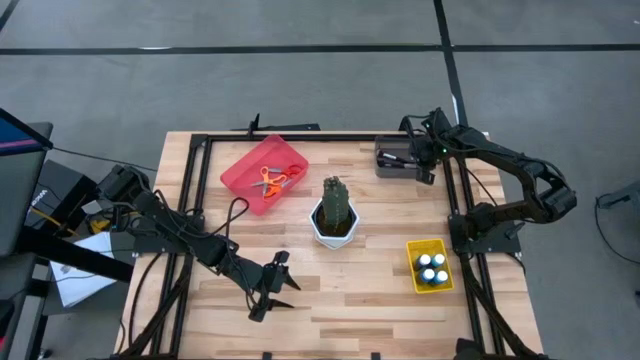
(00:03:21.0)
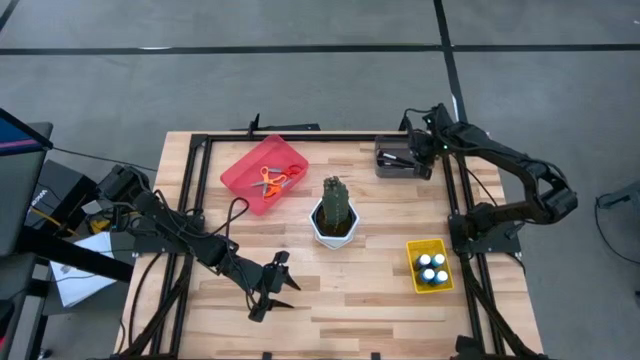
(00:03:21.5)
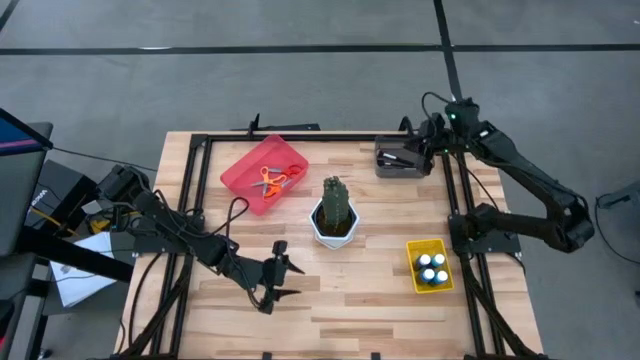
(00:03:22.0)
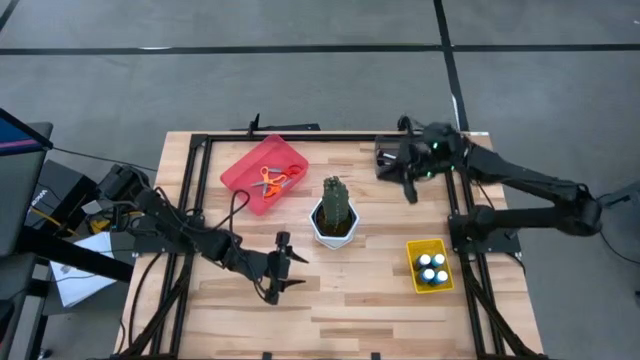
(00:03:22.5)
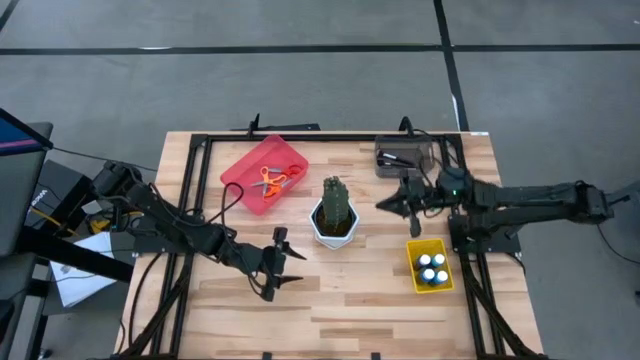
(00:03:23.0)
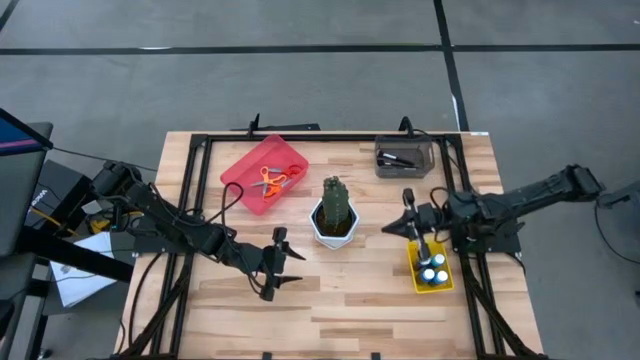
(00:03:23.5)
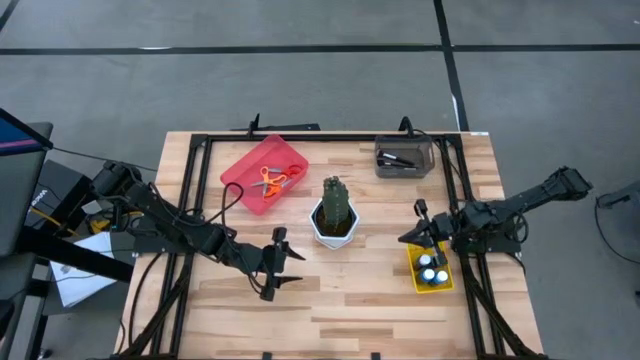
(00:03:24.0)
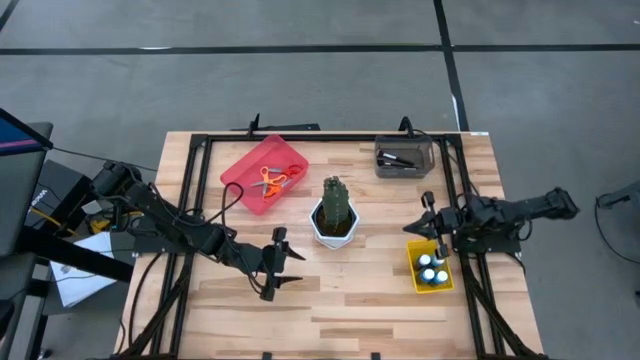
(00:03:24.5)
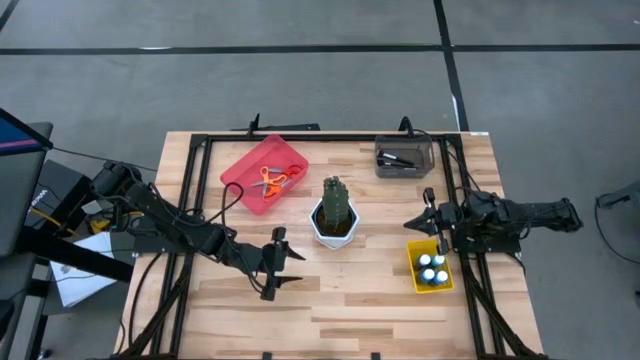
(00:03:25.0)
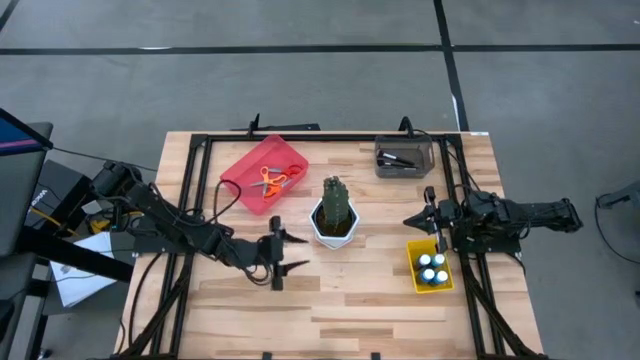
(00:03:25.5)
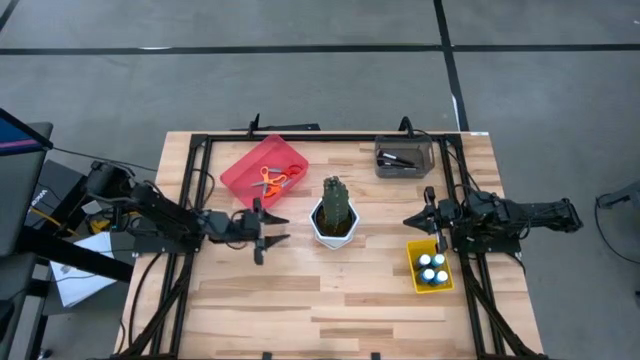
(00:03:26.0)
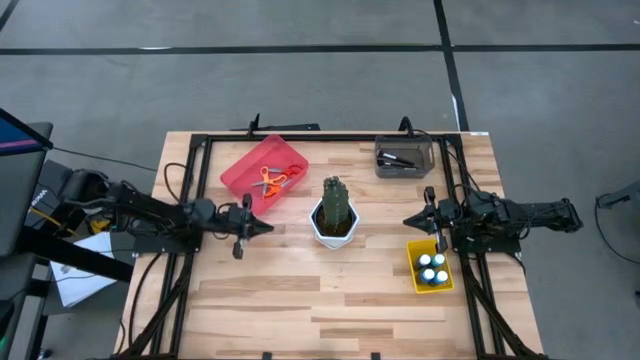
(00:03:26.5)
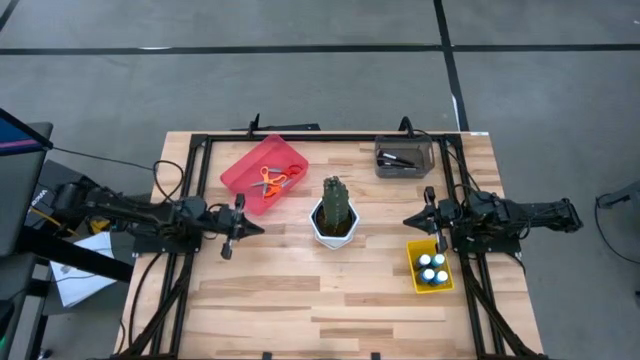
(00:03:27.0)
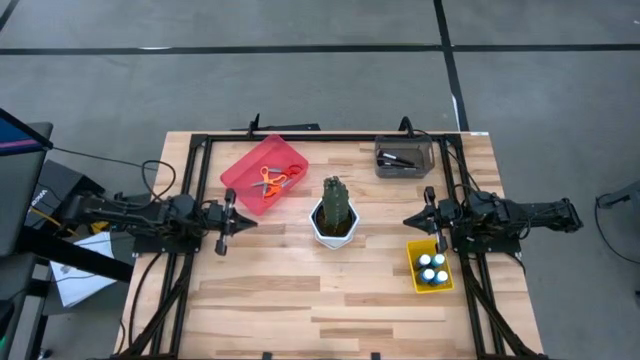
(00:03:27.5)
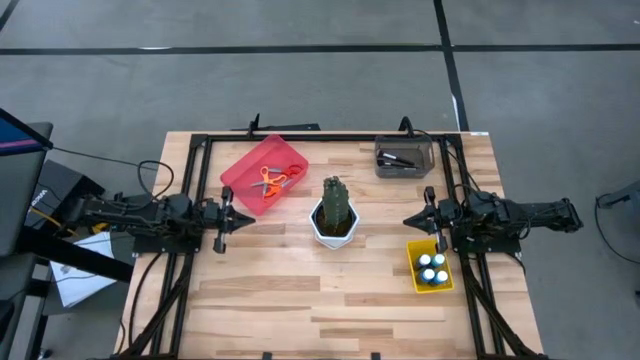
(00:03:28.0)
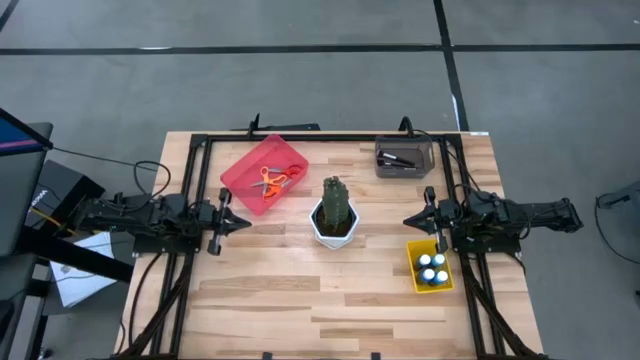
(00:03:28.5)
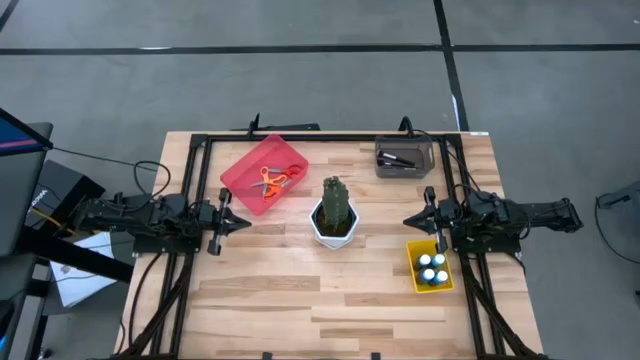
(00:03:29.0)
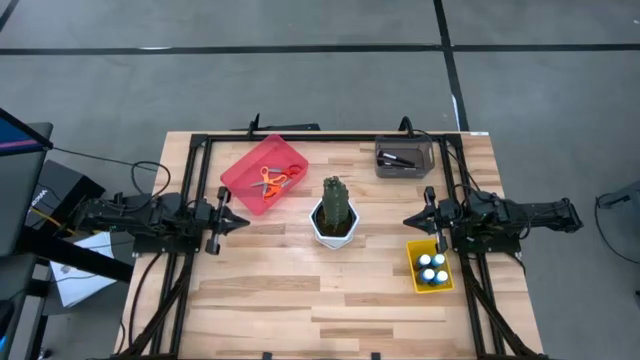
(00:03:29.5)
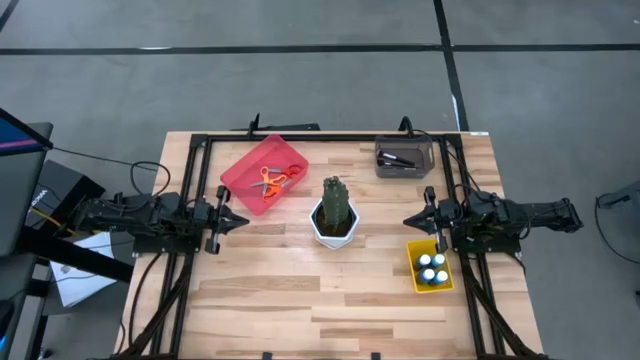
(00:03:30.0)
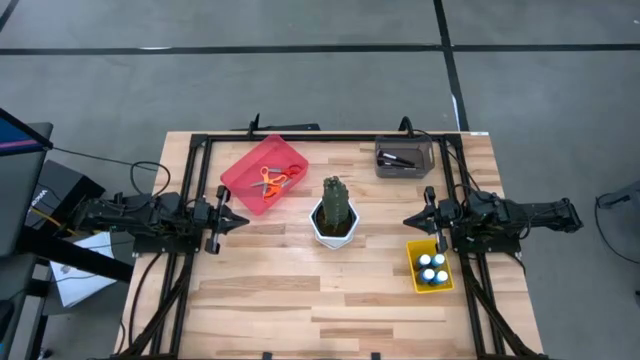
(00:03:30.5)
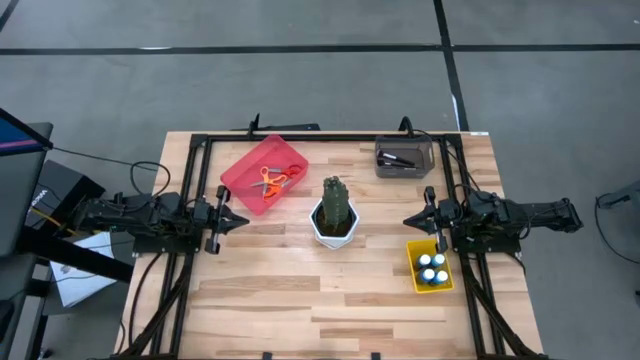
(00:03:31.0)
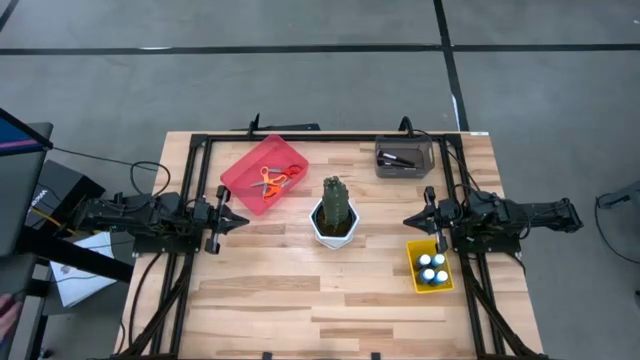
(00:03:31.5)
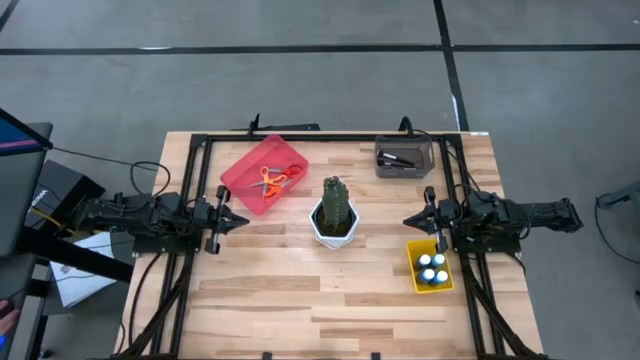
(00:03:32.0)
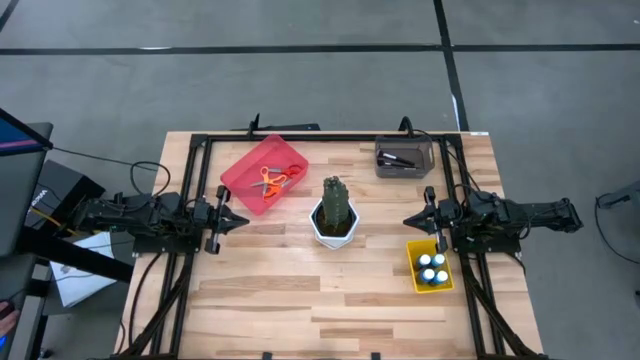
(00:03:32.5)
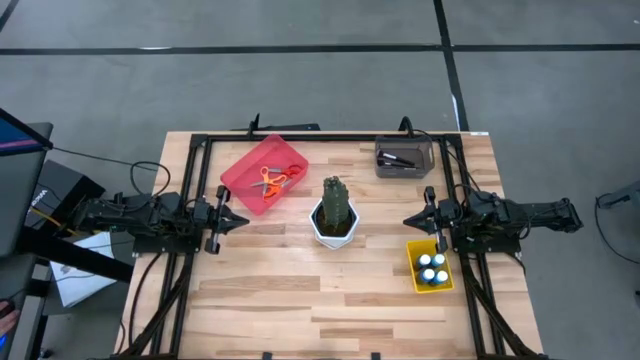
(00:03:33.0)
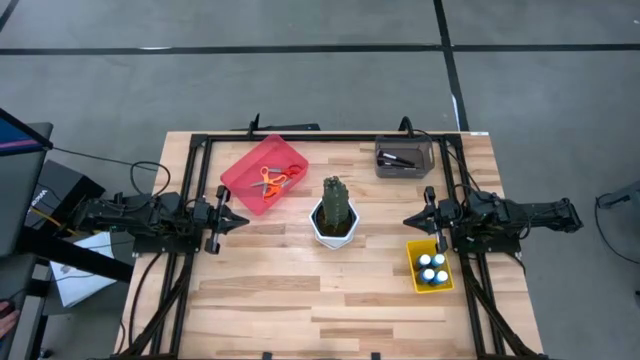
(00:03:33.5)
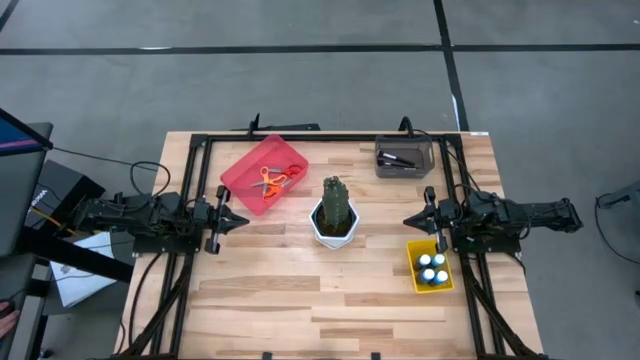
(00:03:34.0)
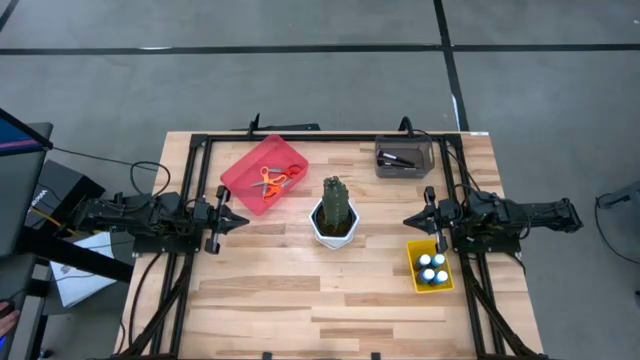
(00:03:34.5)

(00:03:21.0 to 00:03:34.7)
Task: Pick & Place Paint Supplies
Return to Home Position

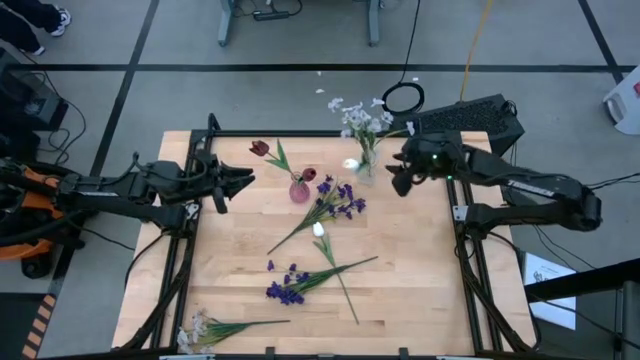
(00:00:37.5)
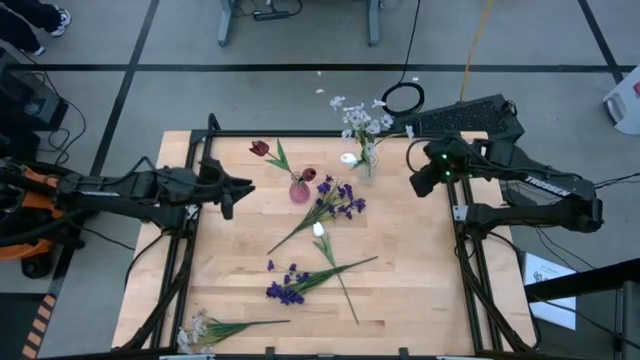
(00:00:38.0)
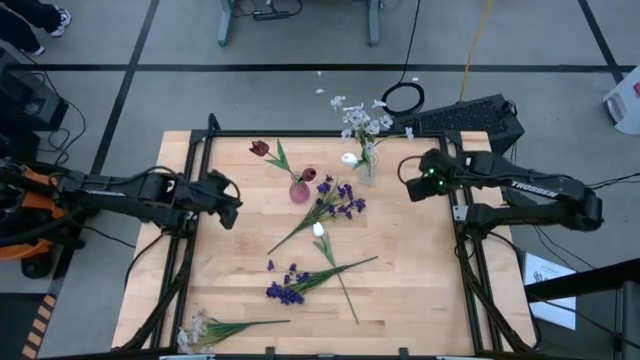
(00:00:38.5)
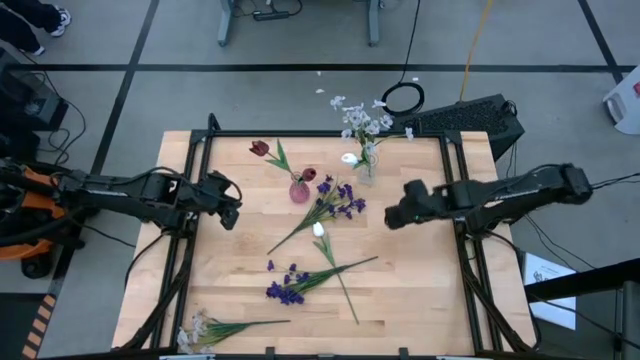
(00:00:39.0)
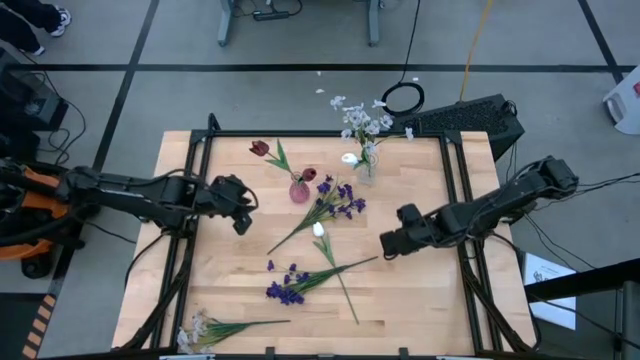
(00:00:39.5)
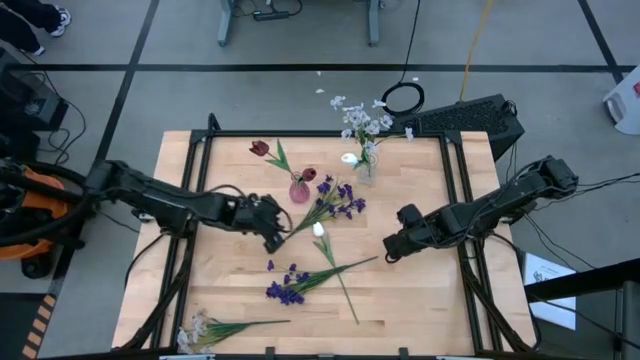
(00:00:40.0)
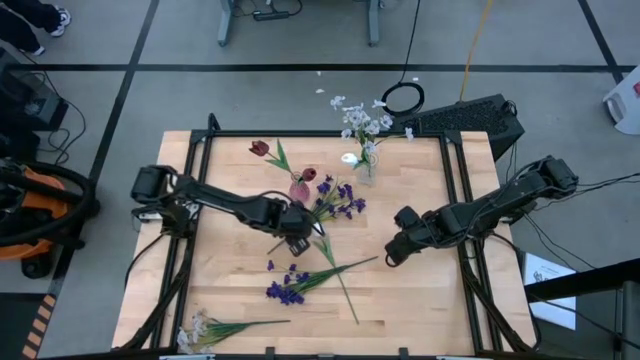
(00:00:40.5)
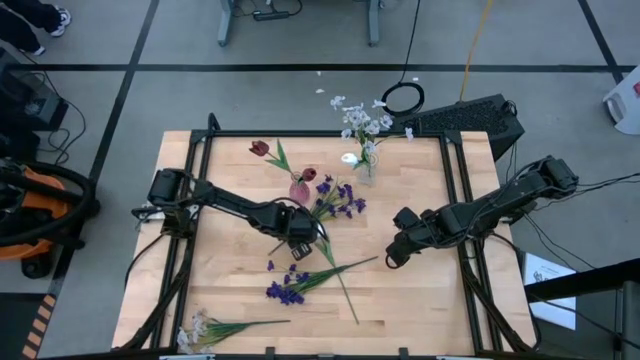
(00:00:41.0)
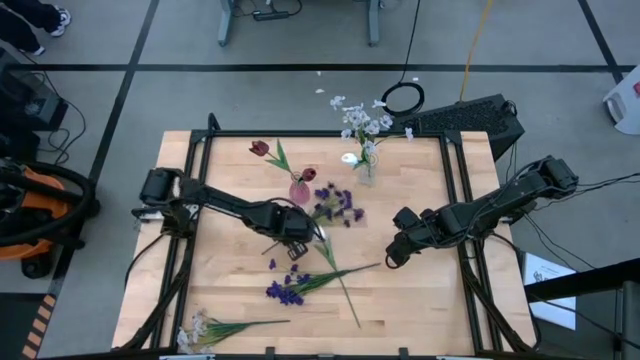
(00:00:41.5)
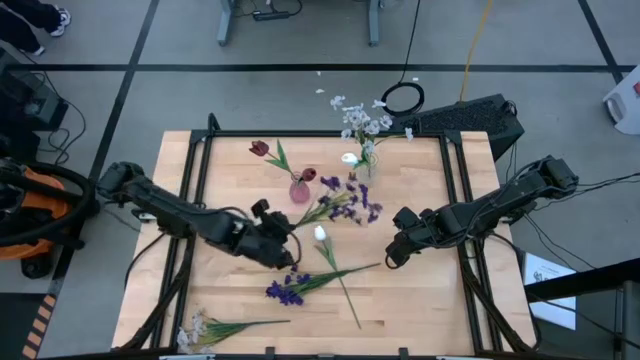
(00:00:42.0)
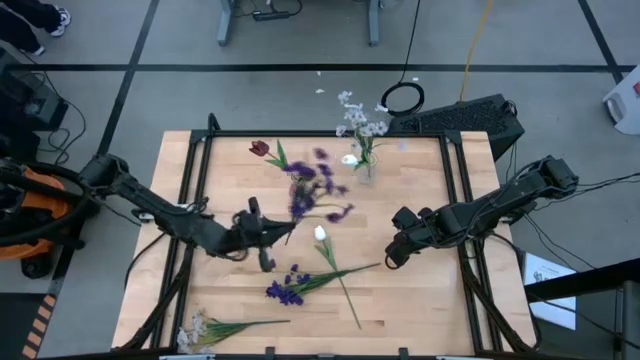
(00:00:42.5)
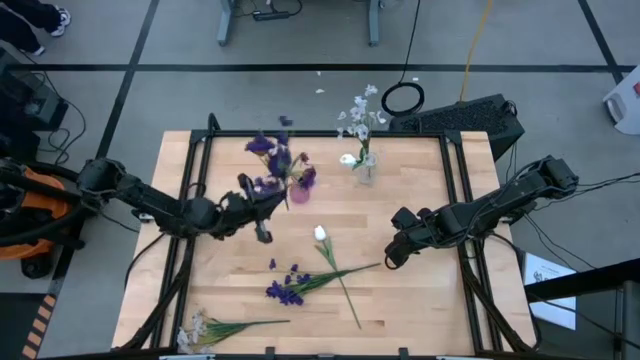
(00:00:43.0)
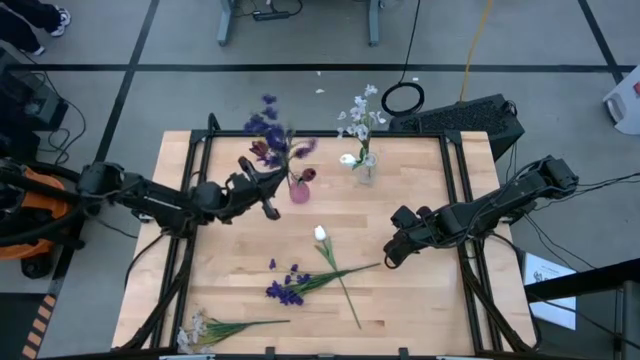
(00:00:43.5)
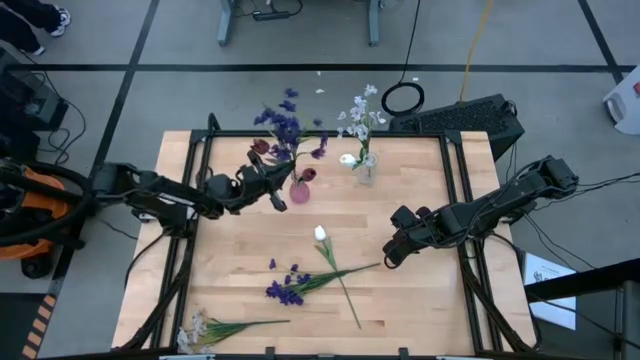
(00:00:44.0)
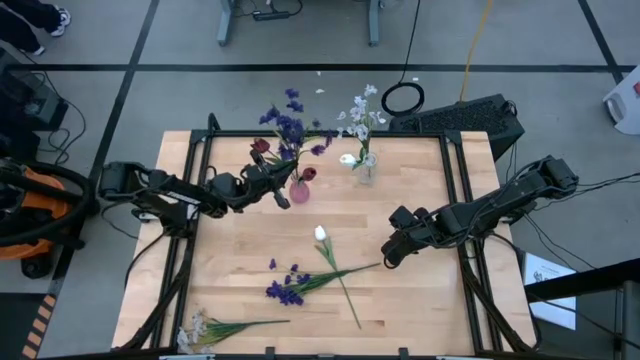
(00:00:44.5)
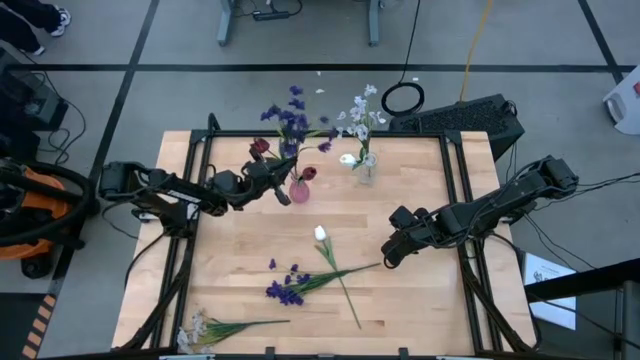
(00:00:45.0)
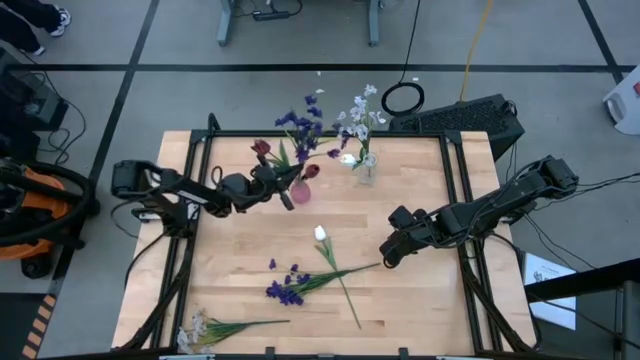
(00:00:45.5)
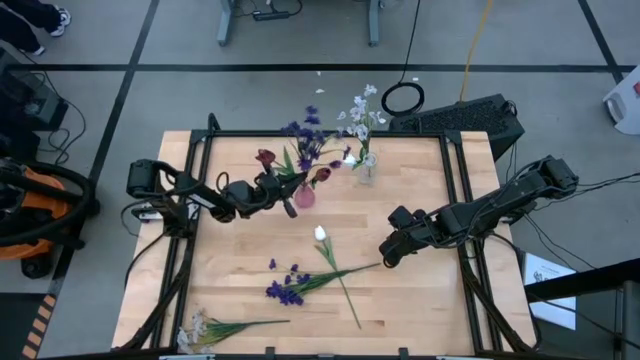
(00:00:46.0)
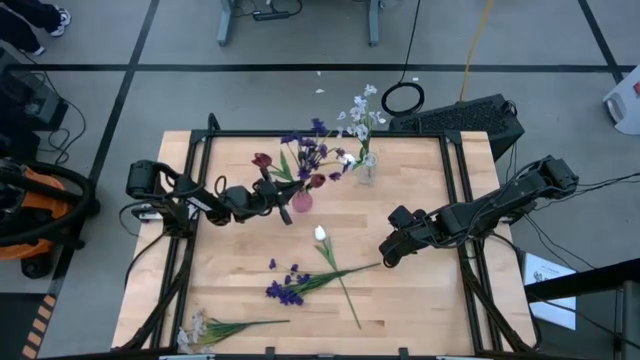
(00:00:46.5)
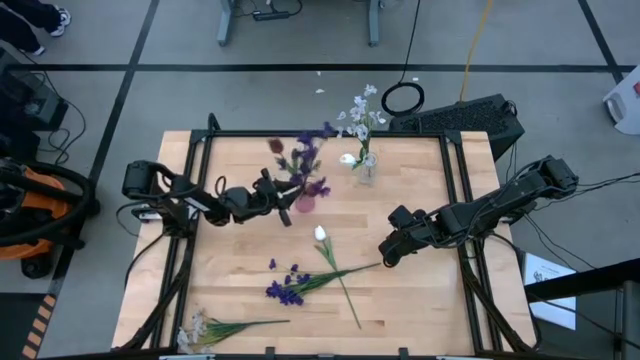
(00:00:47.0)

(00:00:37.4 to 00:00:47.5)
Task: Sort flowers into vase by color
Put the top purple flowers into the transparent purple vase
